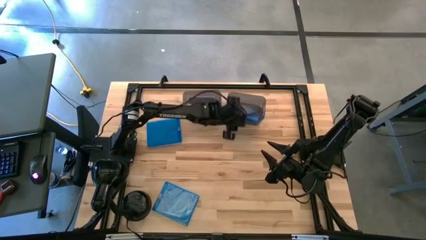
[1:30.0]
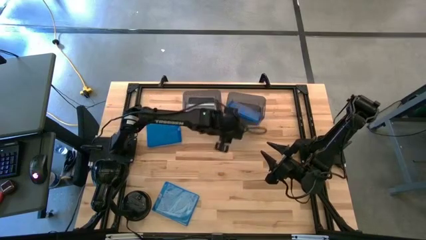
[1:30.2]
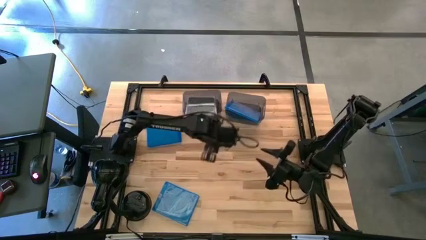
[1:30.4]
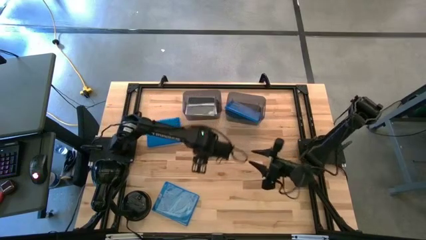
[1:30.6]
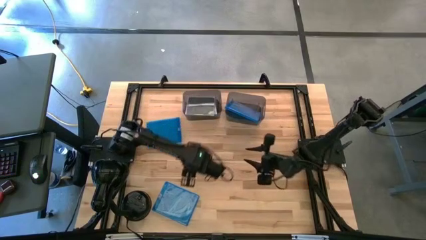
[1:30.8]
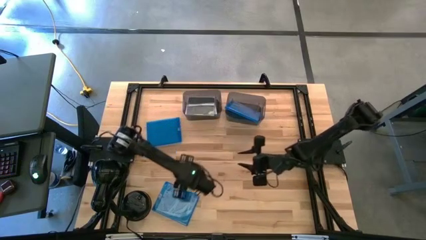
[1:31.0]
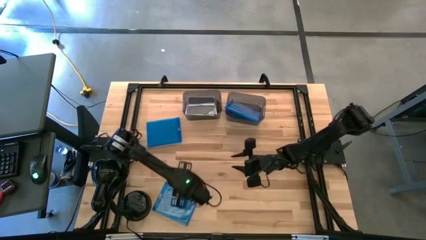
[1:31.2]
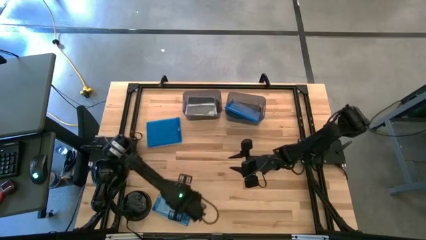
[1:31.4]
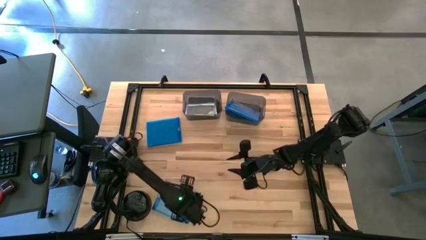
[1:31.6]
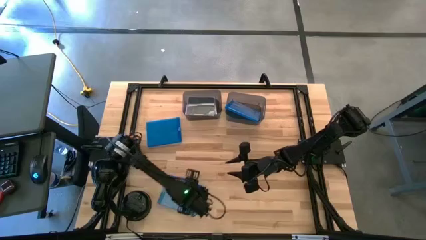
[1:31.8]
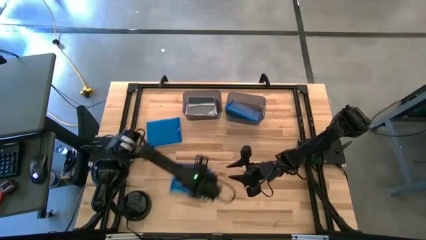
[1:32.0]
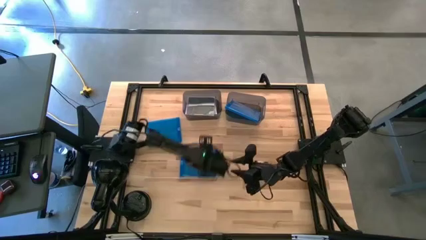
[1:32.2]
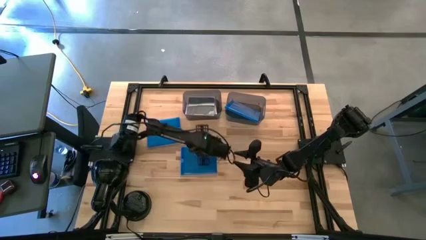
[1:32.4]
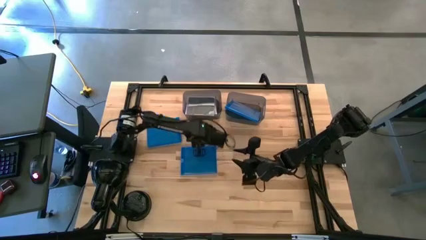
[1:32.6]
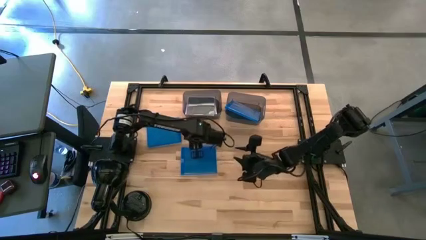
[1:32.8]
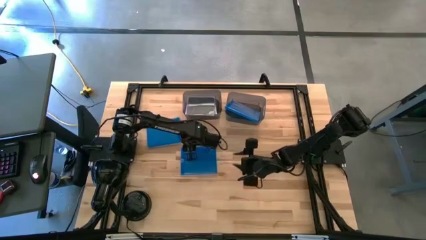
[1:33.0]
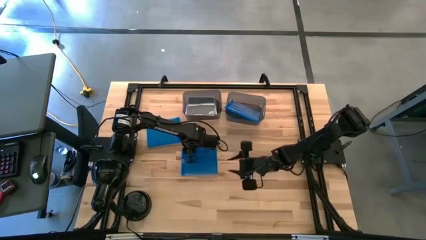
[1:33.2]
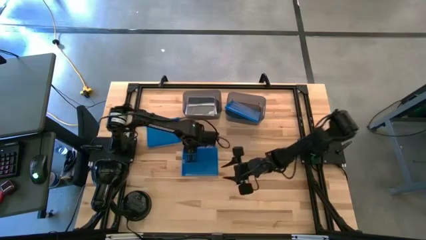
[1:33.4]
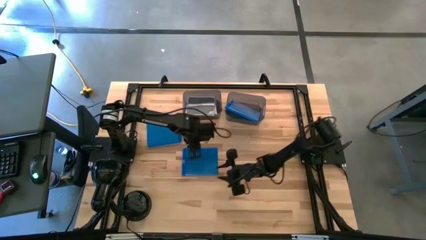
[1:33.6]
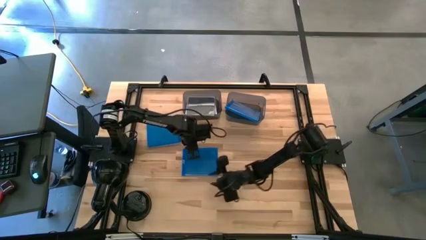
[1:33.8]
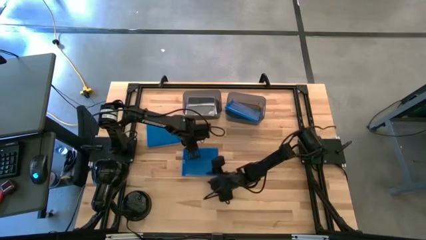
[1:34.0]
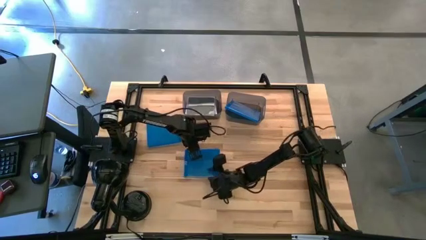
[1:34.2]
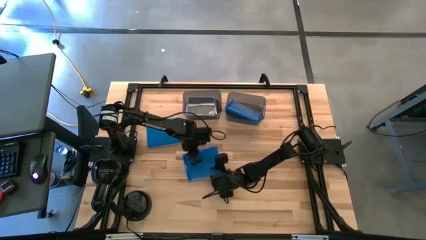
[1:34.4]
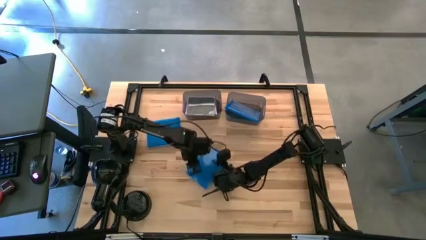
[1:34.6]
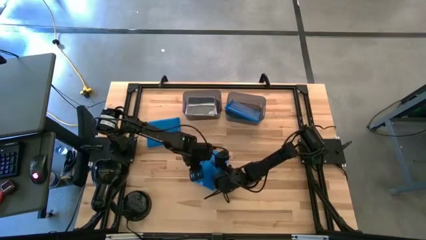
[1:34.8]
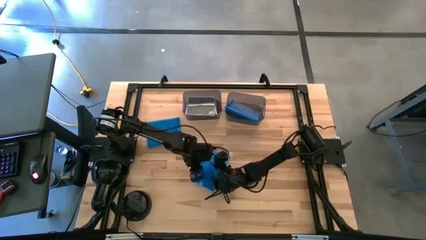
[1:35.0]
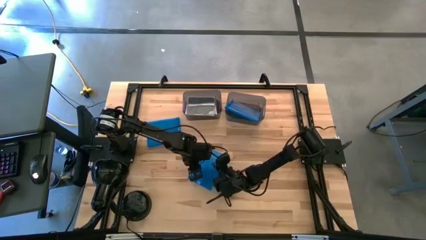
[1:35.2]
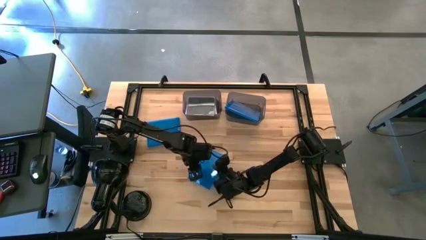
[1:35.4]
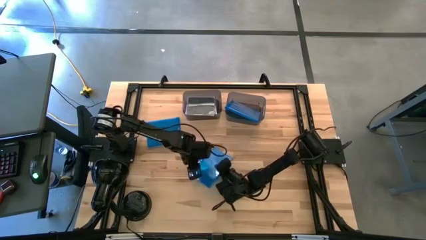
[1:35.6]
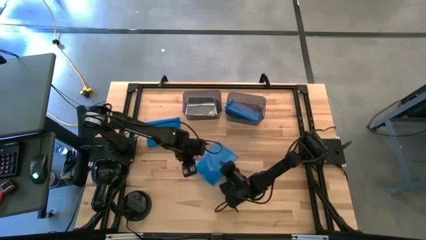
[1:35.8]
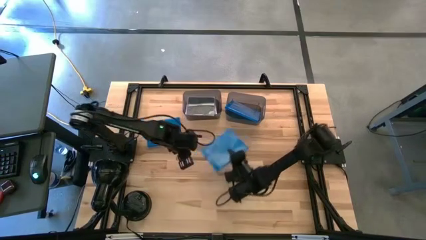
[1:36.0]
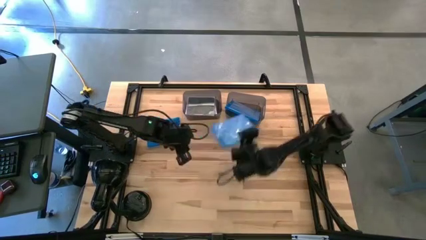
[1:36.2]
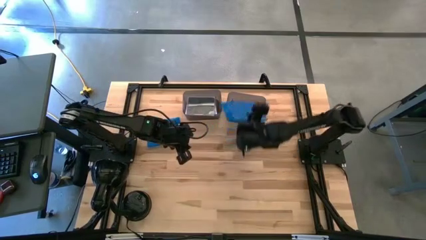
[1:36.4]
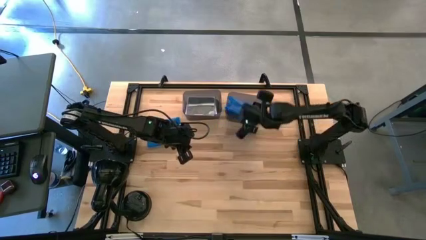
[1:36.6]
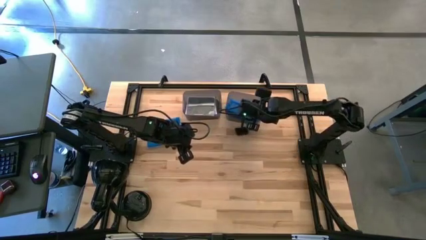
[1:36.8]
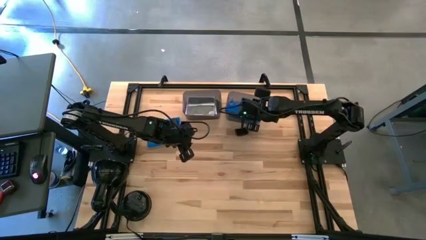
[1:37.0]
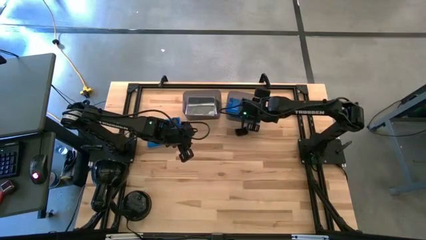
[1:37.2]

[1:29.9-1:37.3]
Task: Pick & place jewel cases by type
Put the bottom blue CD case into the right black bin

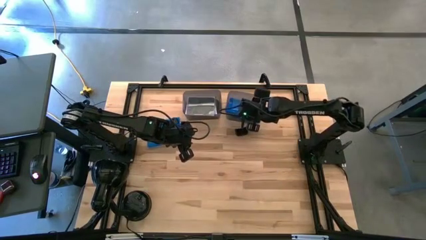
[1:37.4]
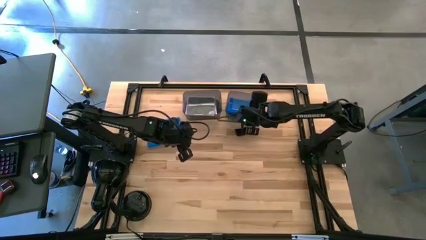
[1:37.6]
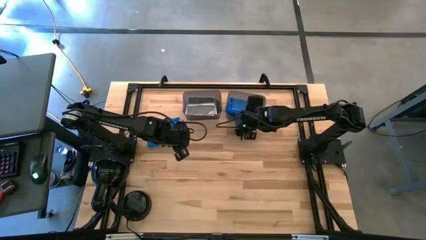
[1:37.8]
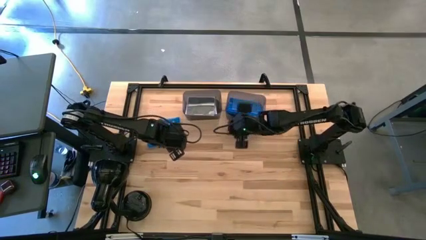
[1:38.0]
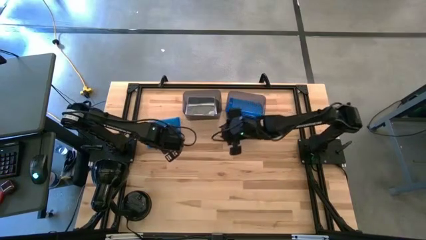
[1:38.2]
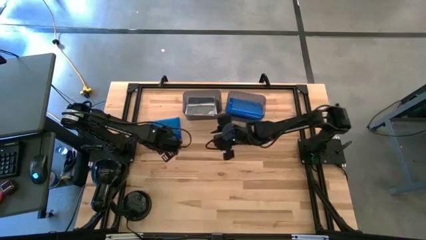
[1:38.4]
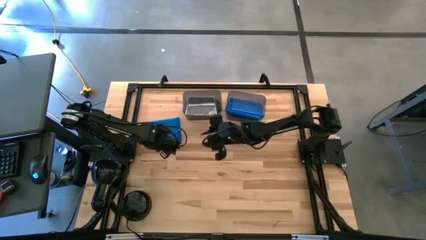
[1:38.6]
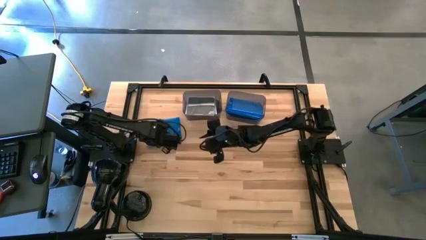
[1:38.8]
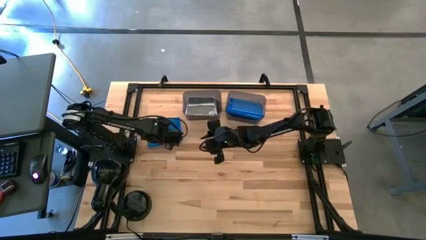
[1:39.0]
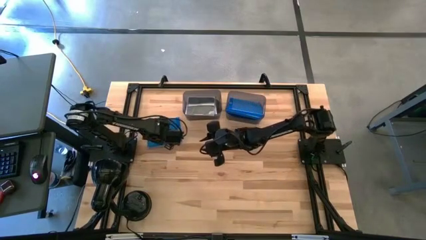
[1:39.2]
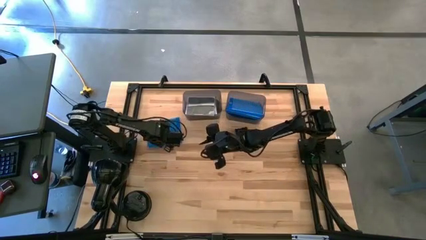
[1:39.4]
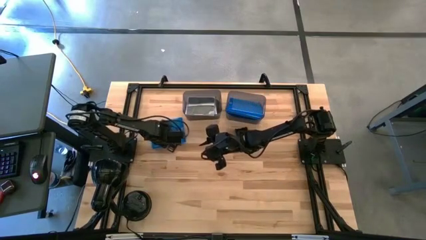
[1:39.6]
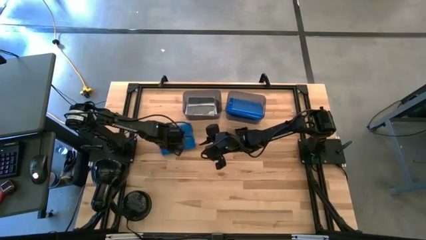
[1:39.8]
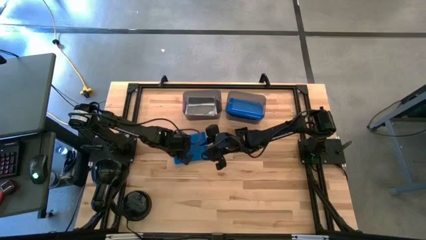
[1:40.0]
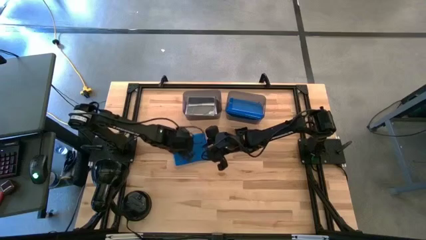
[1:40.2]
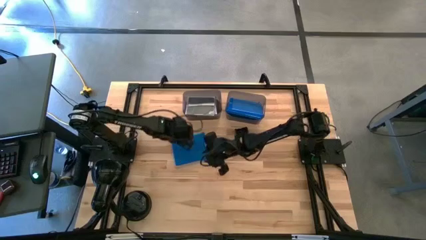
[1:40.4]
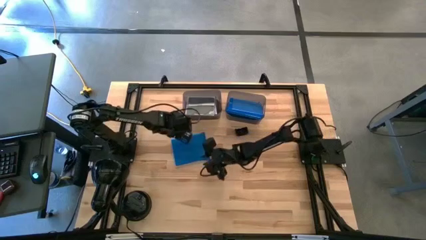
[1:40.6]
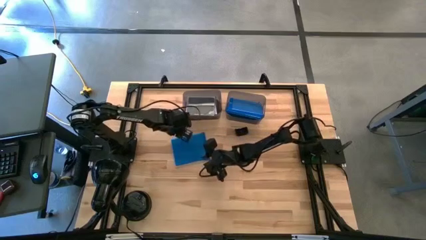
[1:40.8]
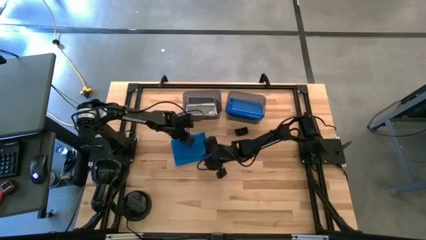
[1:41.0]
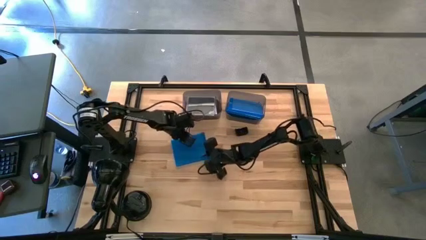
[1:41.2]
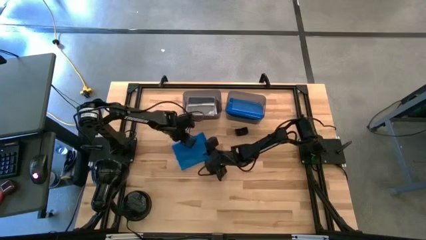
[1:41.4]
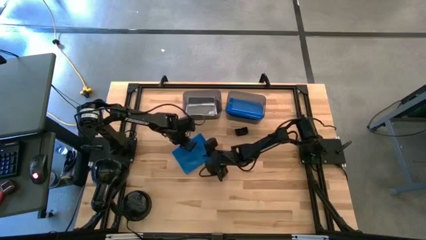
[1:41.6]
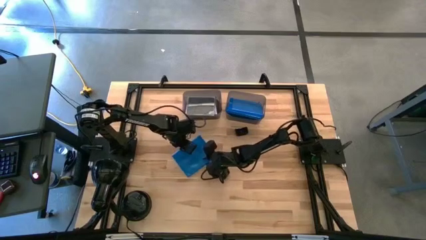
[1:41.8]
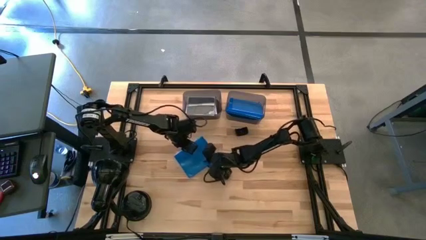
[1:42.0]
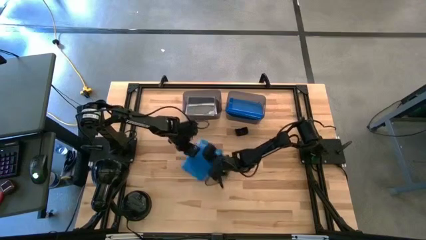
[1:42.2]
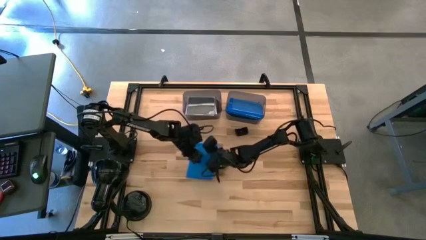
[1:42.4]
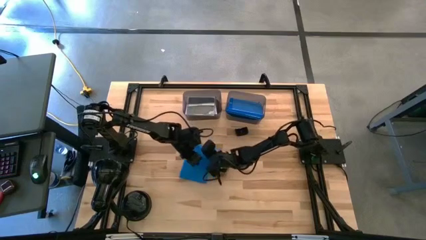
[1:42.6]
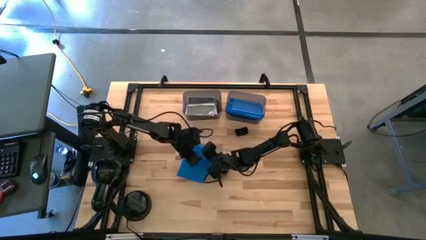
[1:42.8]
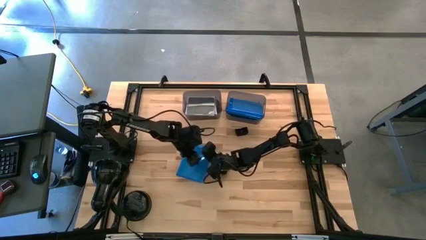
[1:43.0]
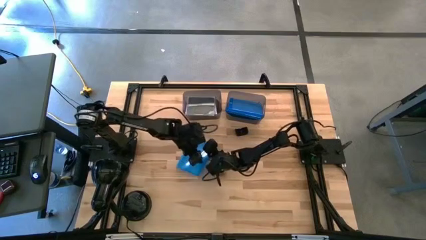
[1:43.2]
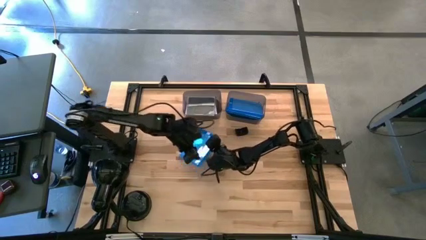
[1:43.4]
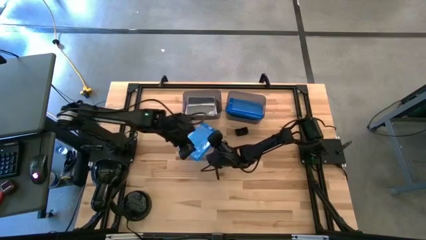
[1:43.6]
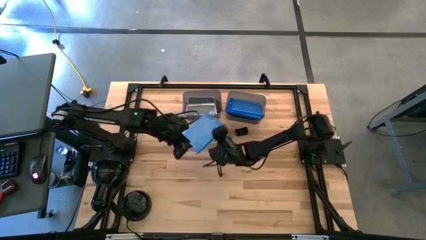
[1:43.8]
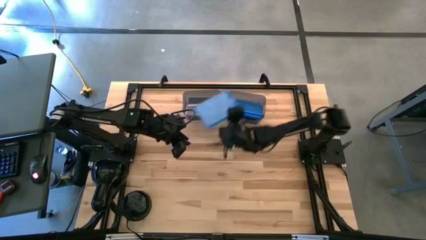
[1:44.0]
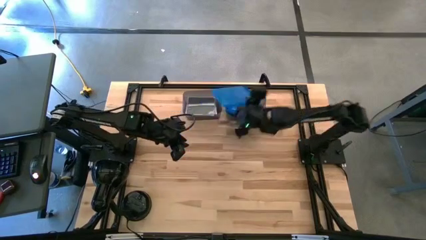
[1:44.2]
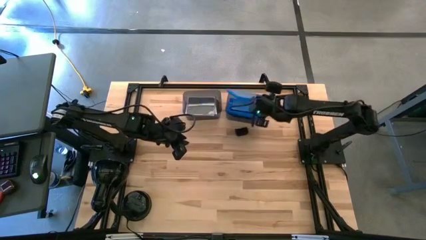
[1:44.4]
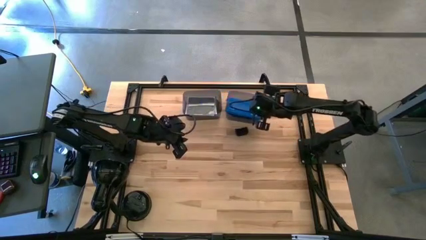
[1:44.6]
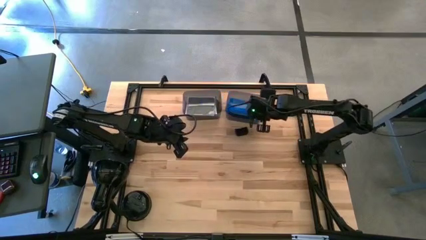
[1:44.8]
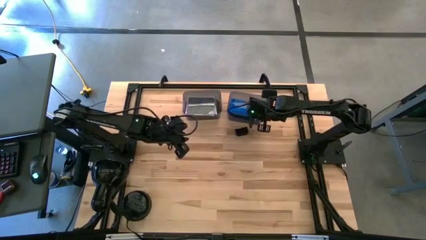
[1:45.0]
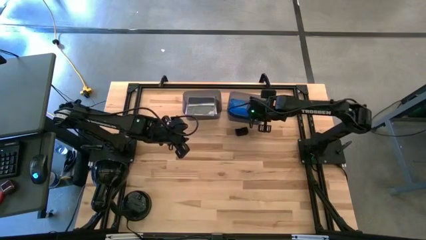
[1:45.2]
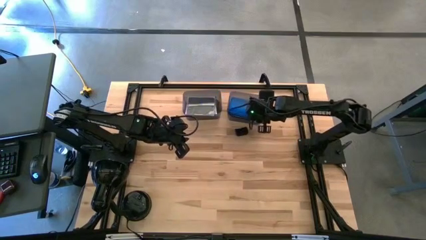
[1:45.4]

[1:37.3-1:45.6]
Put the blue CD case into the right black bin
